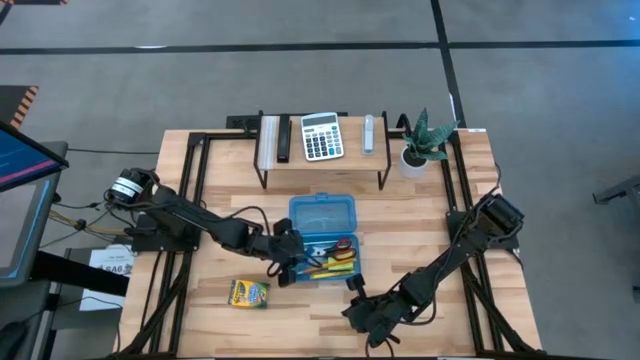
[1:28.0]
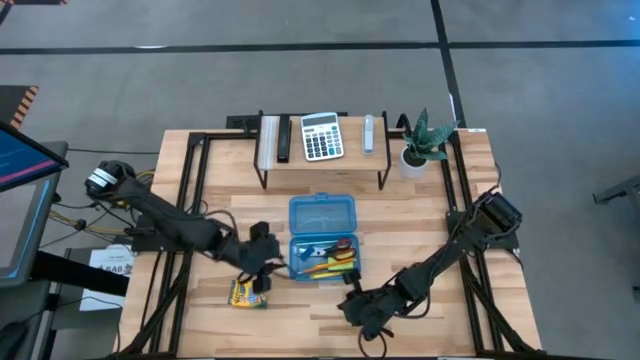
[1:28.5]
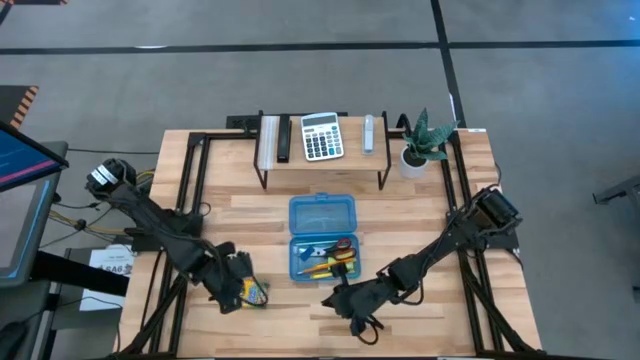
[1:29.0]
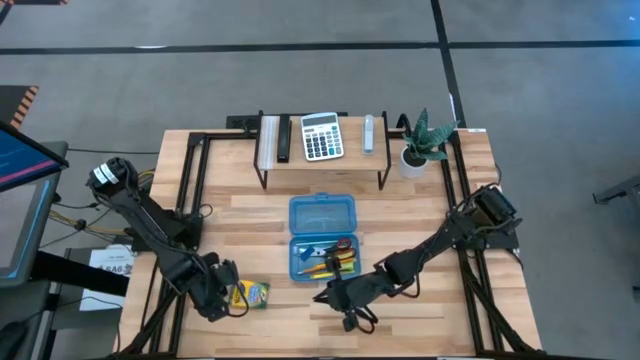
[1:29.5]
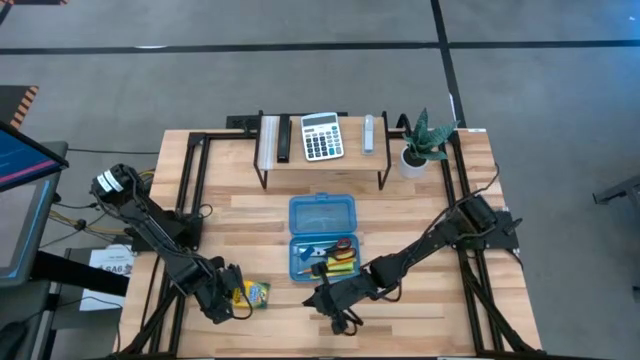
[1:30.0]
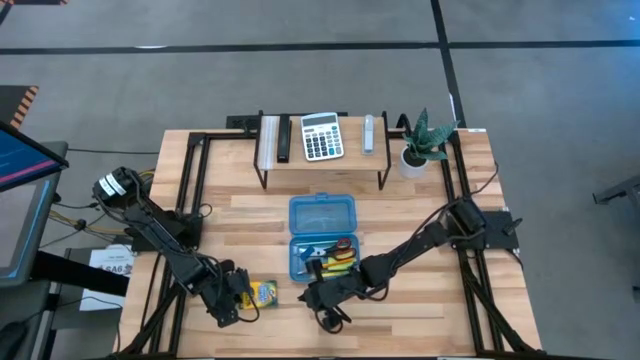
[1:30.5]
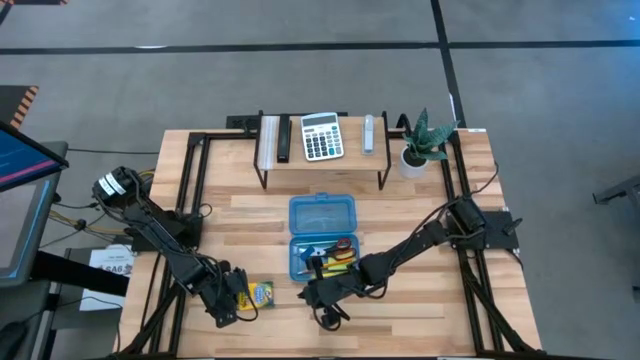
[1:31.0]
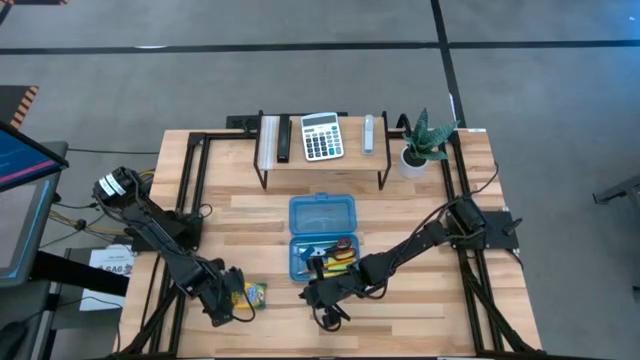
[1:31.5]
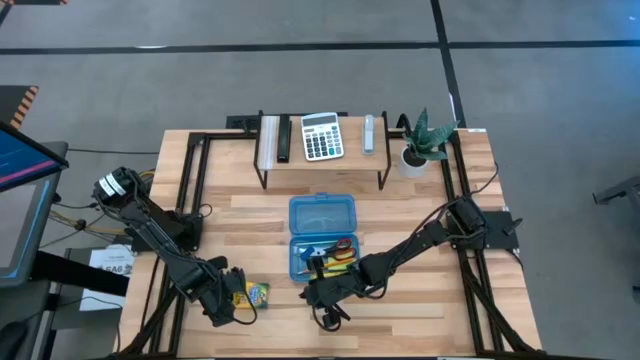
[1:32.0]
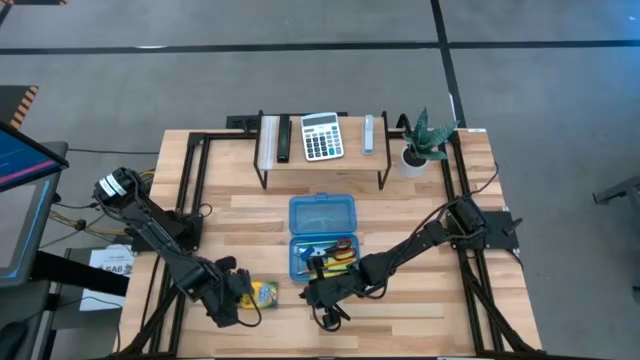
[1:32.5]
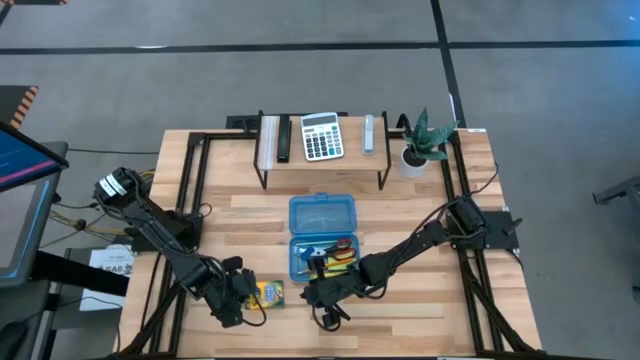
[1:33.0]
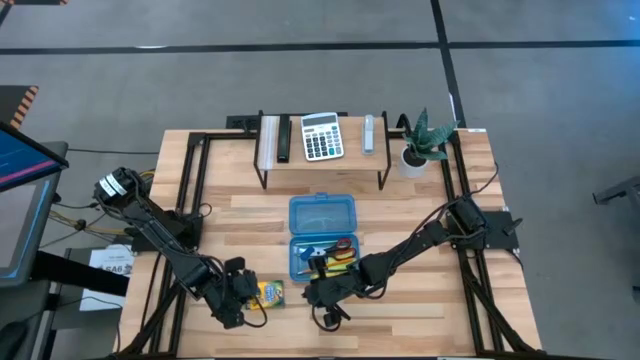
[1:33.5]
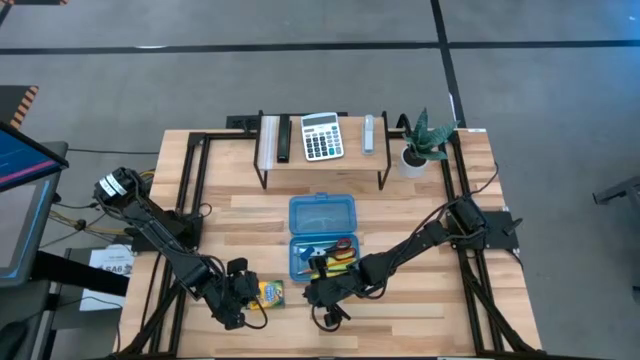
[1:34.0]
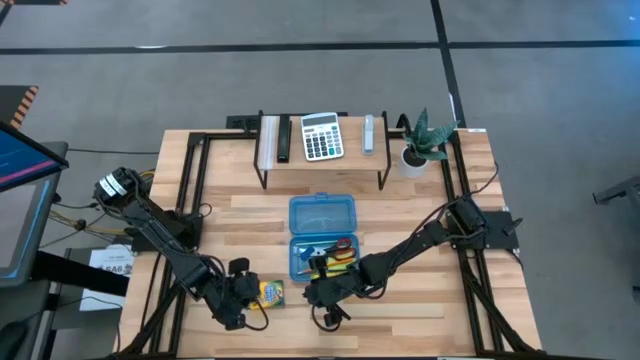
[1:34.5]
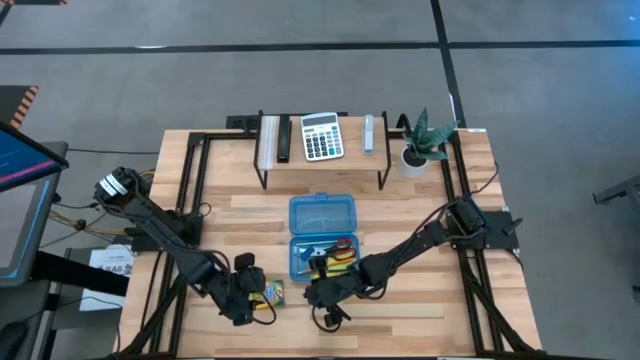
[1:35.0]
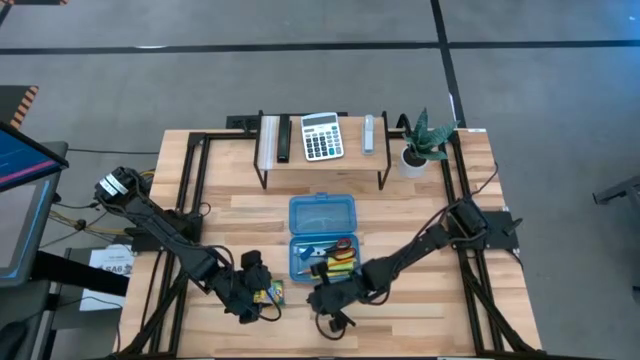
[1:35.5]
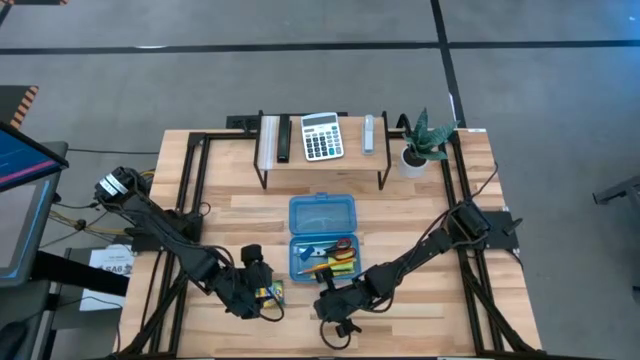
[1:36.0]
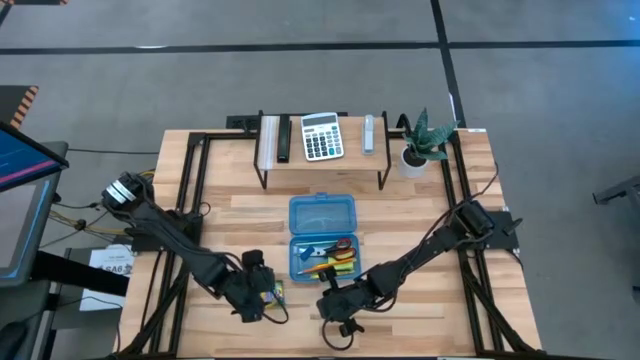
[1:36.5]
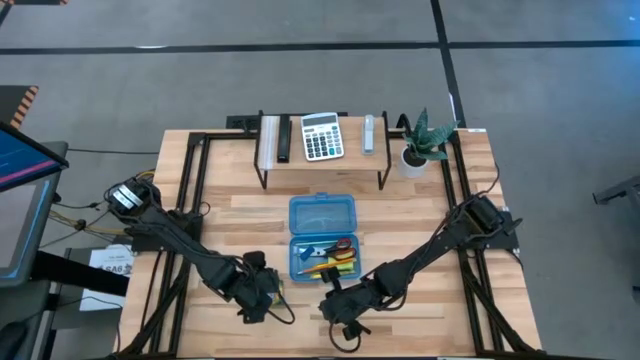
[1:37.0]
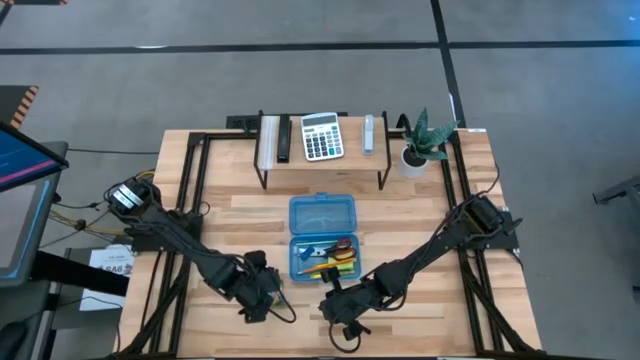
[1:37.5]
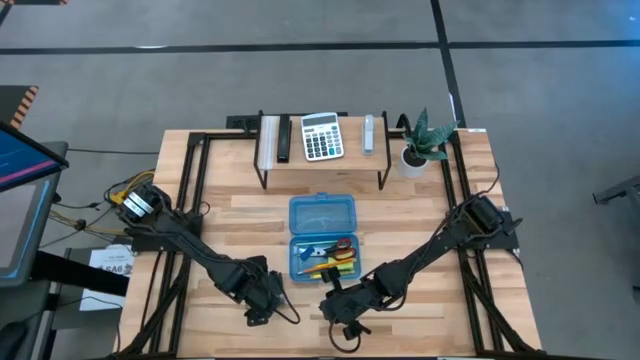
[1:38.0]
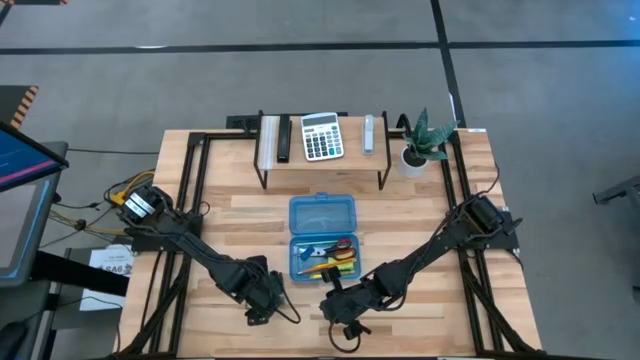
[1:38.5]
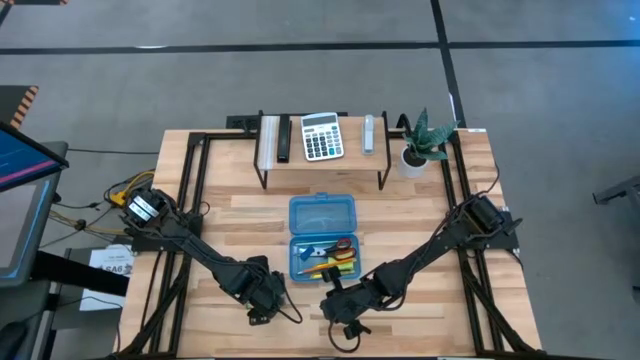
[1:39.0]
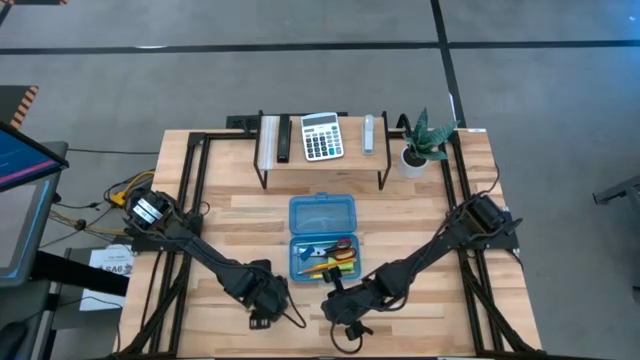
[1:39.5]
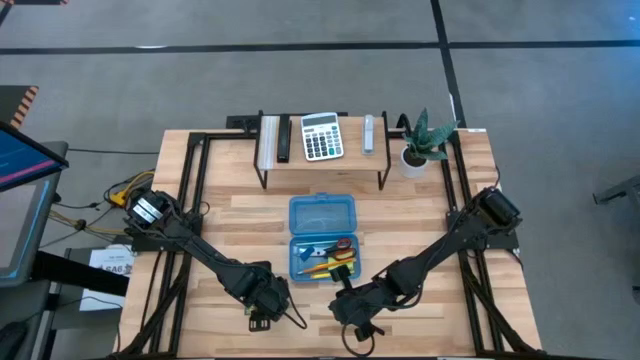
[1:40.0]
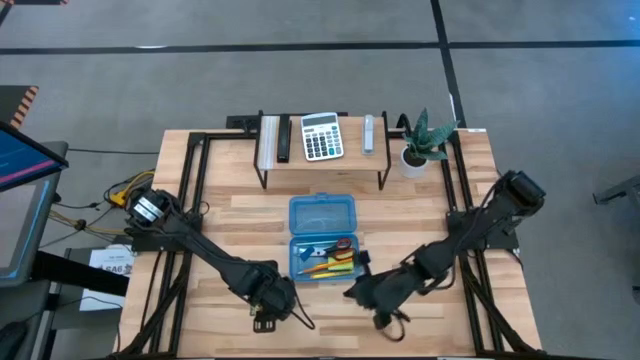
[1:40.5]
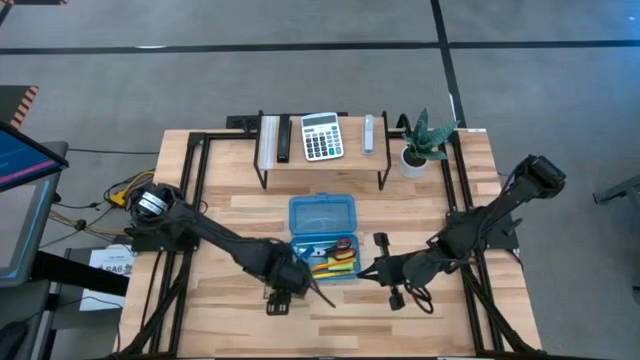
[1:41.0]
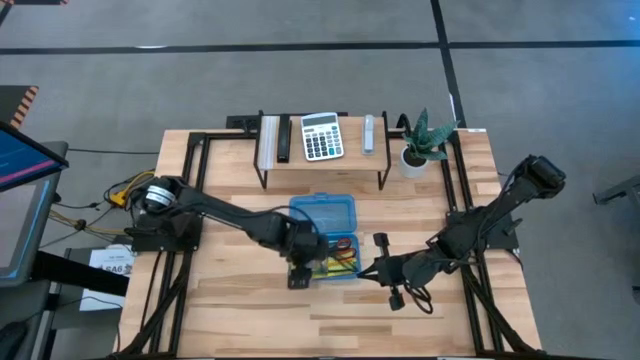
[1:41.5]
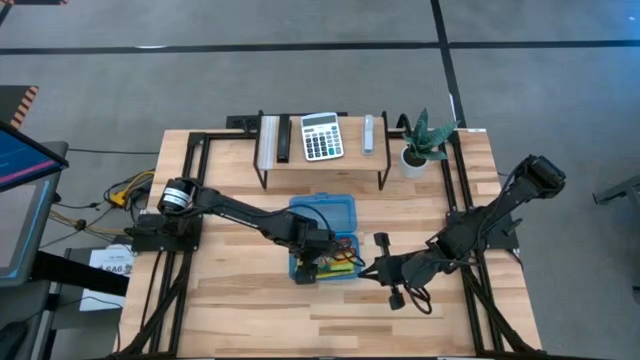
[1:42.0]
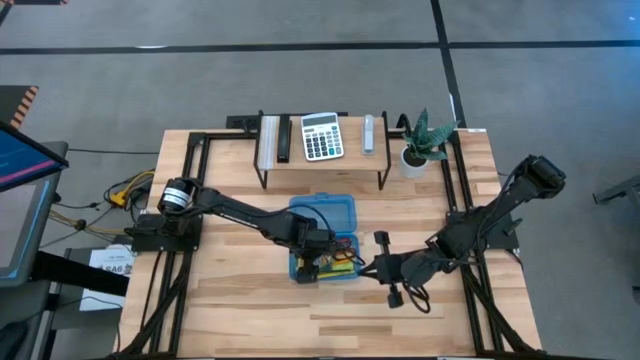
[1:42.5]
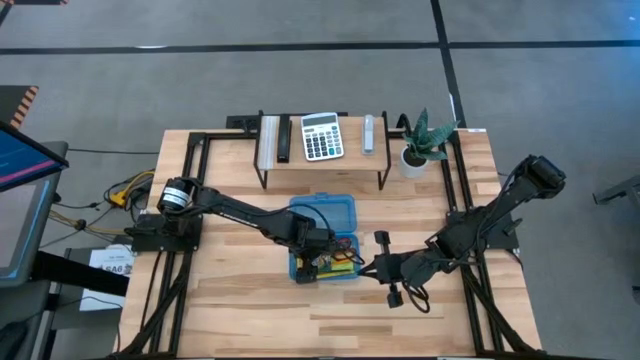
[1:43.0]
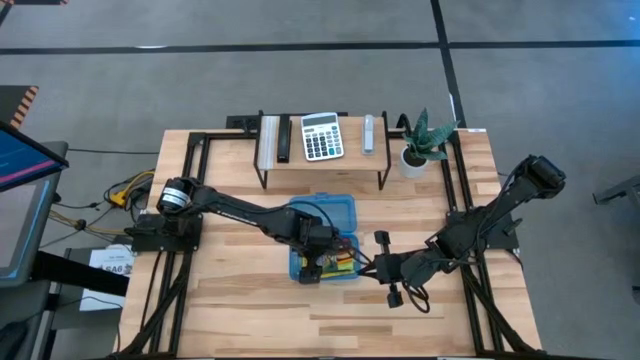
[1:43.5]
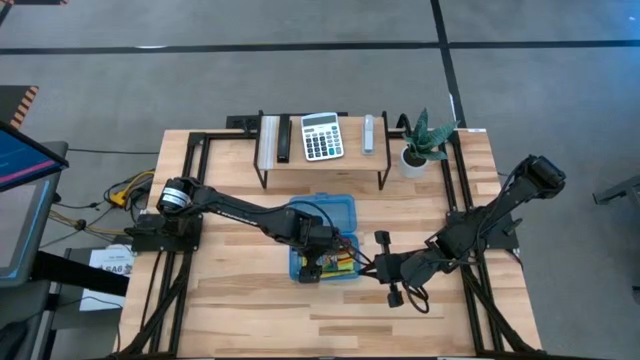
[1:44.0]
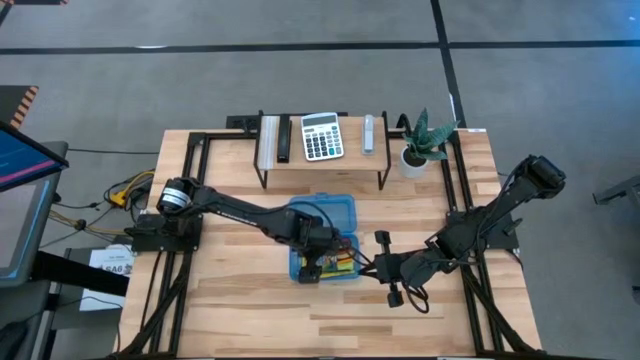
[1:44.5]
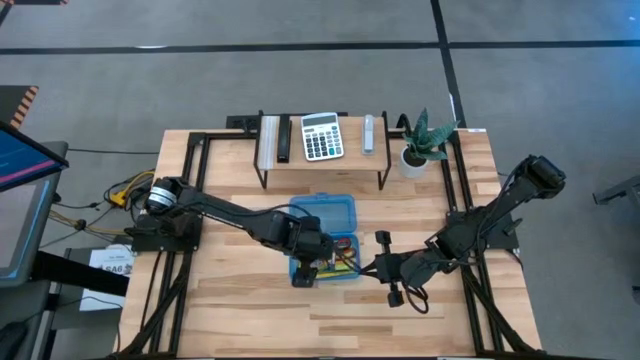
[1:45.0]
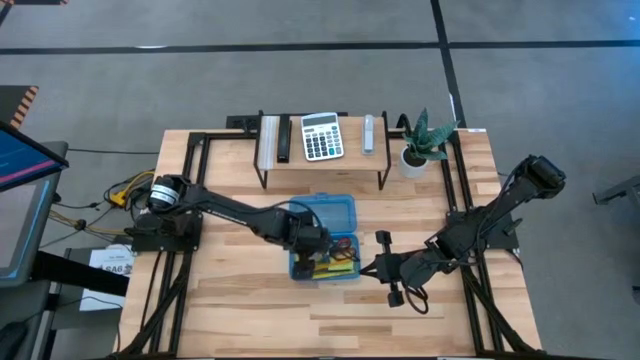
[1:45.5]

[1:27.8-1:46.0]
Task: Pack school essentials
Put the crayon pack into the blue supply box

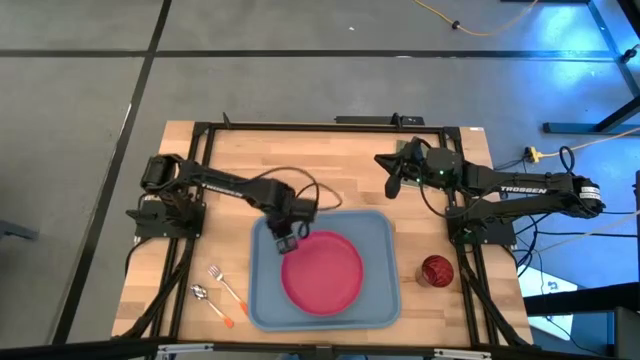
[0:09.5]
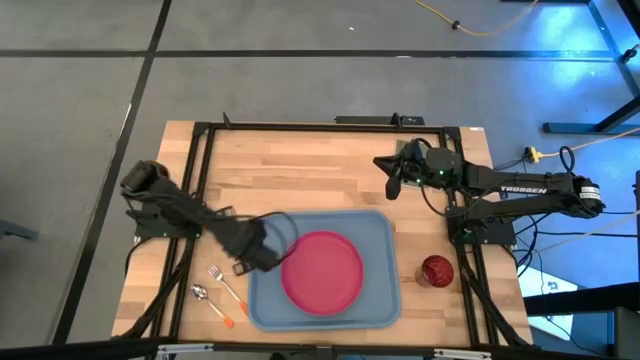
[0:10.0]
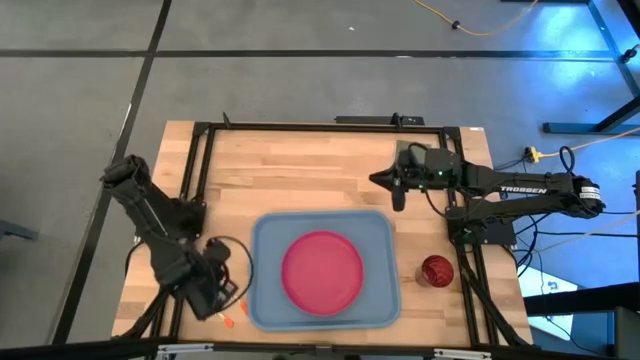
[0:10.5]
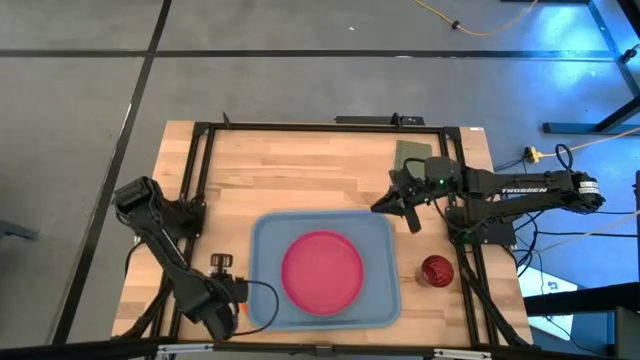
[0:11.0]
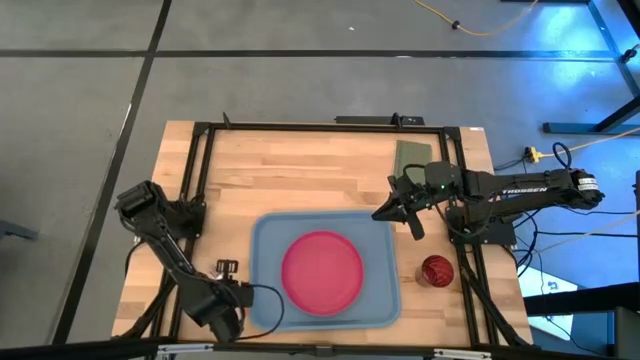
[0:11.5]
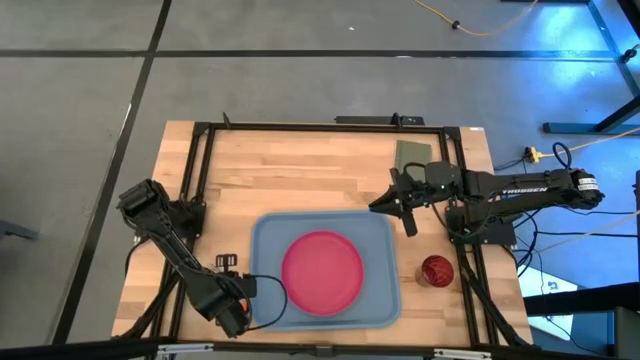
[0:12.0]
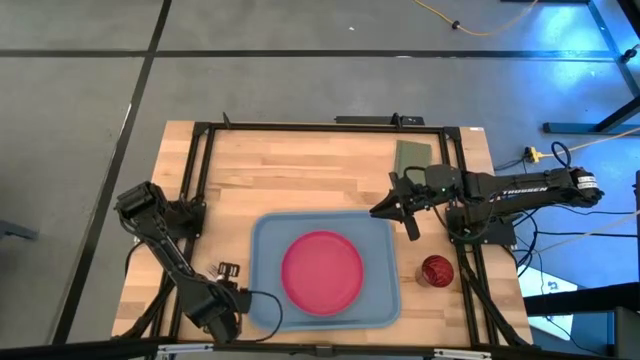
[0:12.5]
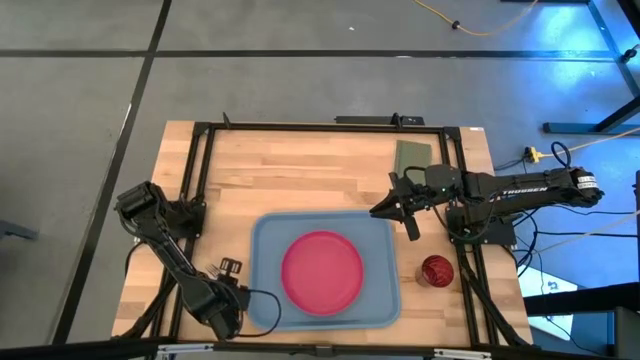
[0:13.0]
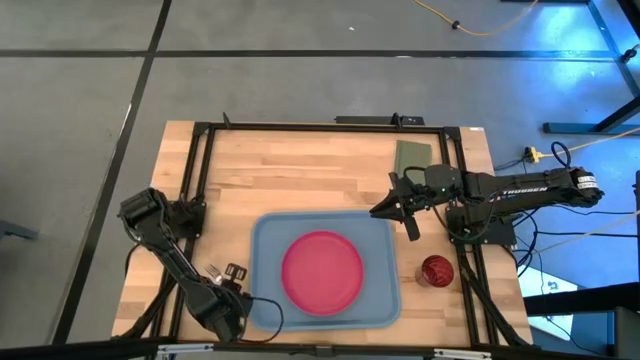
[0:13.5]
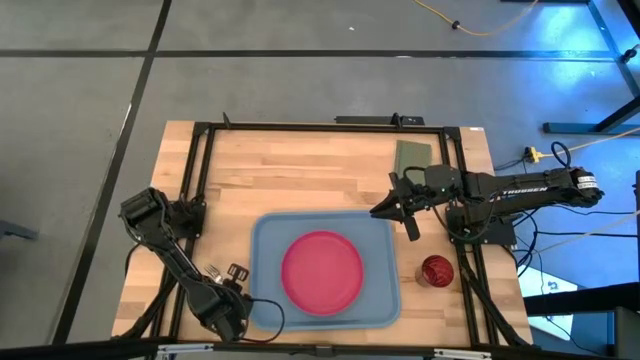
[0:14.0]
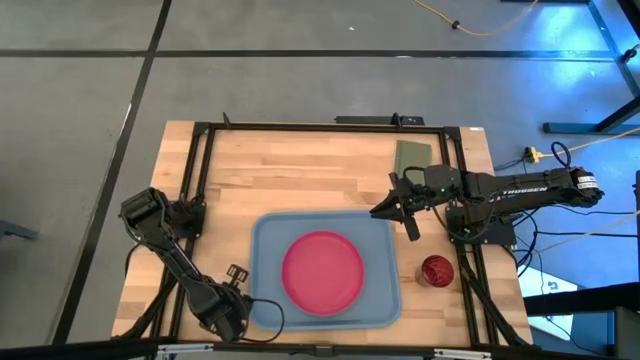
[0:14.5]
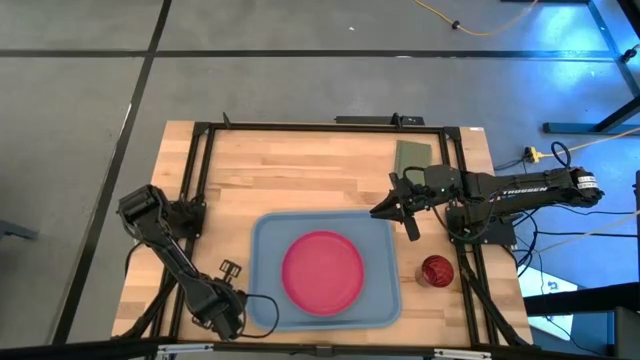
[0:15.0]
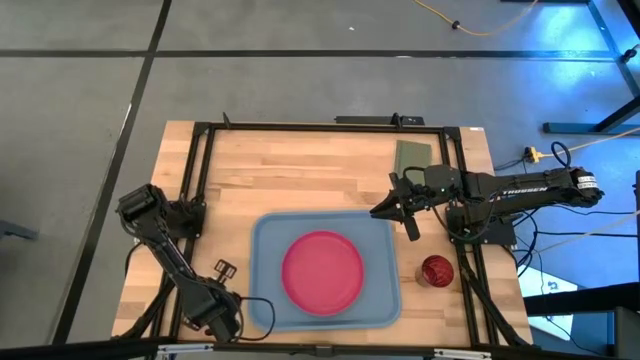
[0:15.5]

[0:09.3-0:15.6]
Task: Pick and place plate/cup/fork/spoon on tray
Put the orange fork on the blue serving tray to the left side of the pink plate
